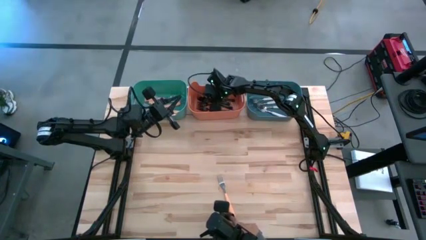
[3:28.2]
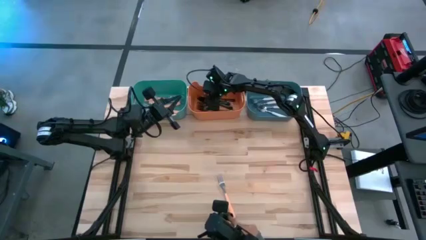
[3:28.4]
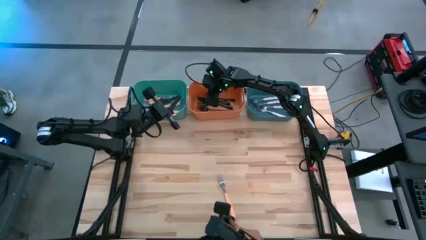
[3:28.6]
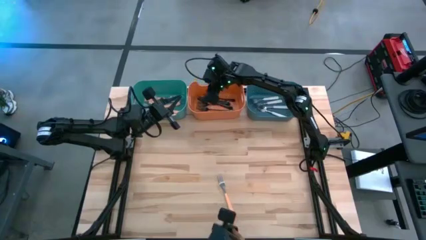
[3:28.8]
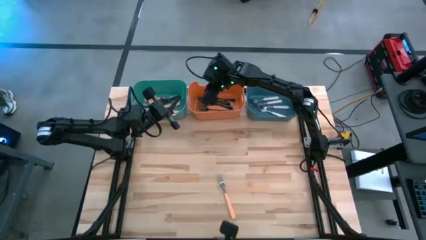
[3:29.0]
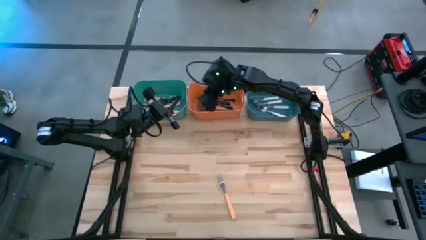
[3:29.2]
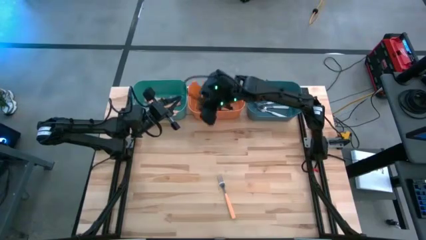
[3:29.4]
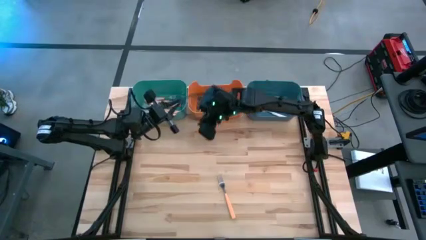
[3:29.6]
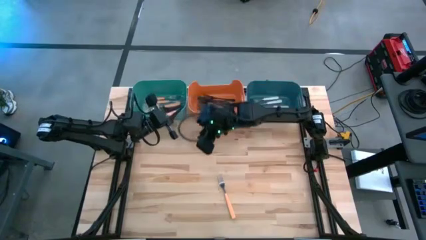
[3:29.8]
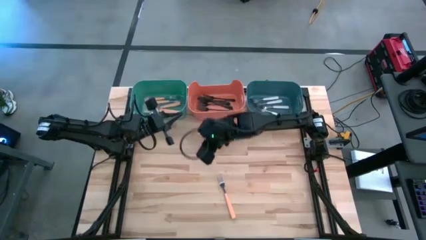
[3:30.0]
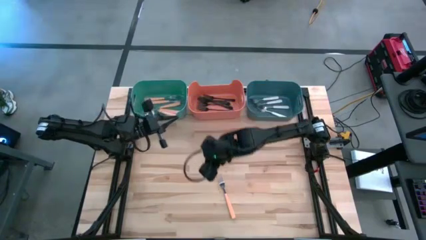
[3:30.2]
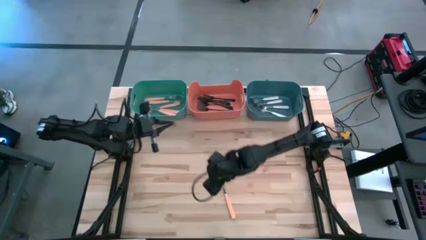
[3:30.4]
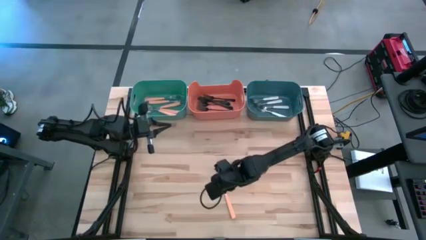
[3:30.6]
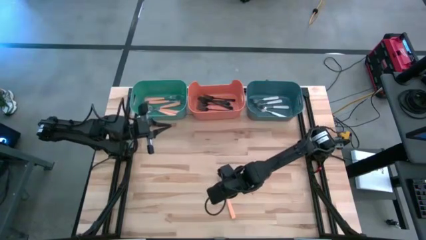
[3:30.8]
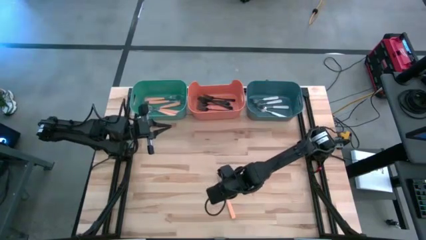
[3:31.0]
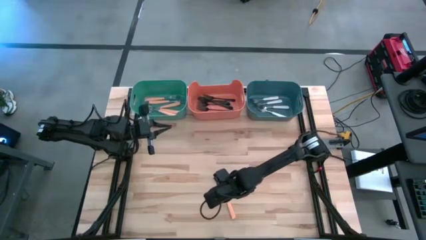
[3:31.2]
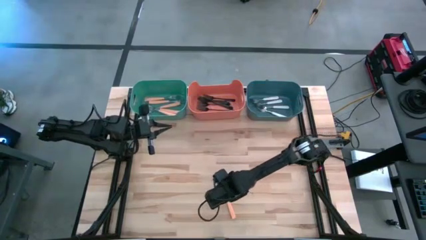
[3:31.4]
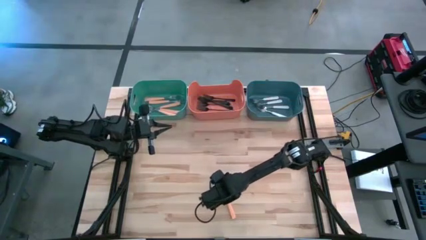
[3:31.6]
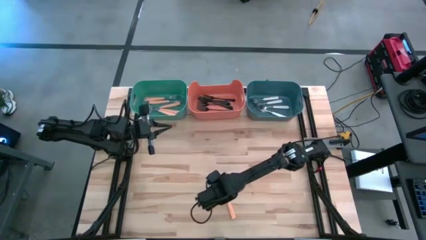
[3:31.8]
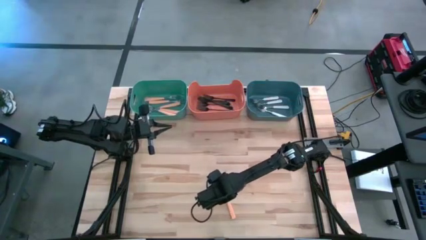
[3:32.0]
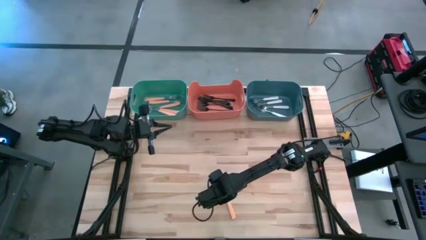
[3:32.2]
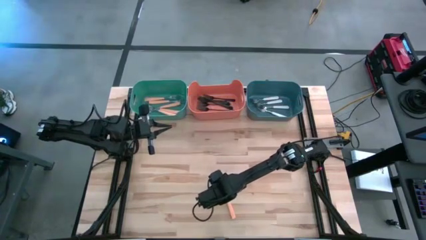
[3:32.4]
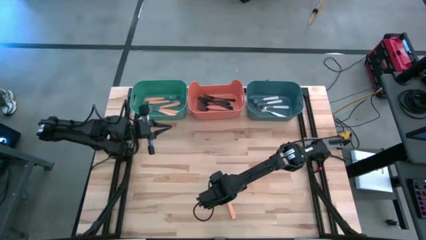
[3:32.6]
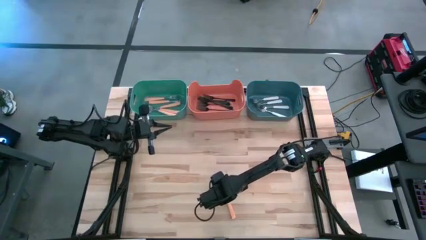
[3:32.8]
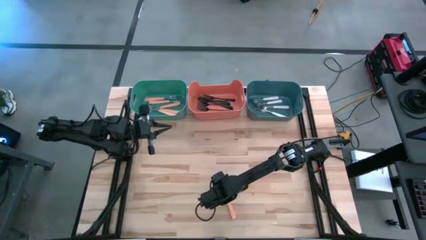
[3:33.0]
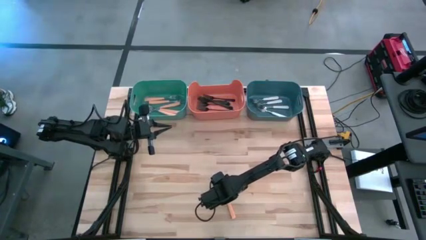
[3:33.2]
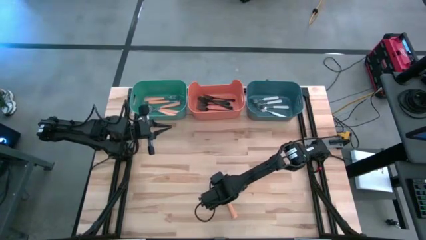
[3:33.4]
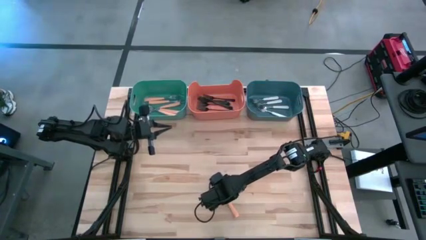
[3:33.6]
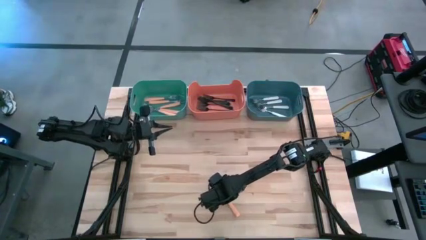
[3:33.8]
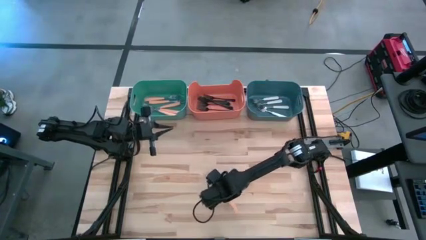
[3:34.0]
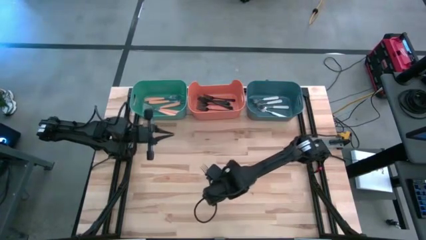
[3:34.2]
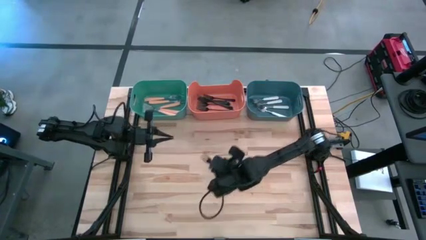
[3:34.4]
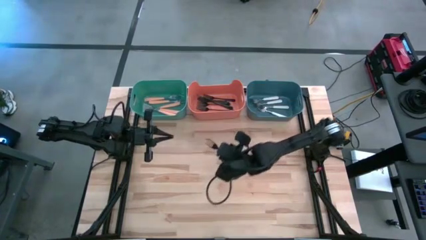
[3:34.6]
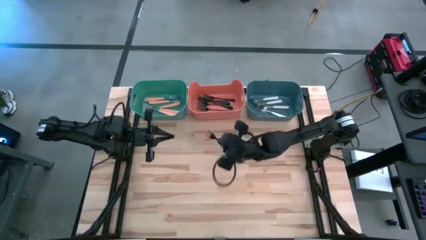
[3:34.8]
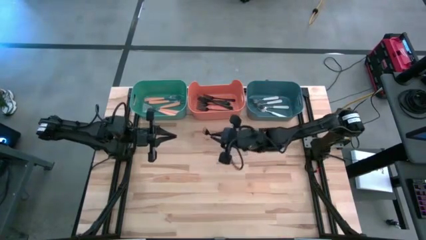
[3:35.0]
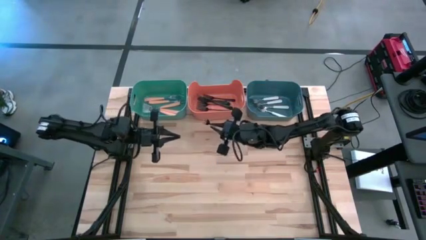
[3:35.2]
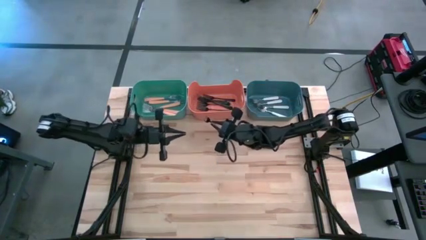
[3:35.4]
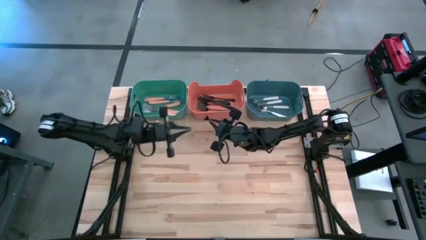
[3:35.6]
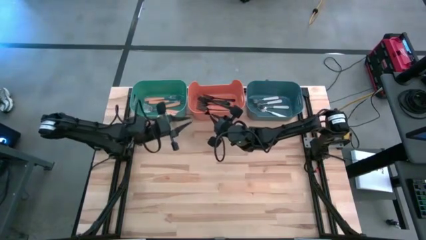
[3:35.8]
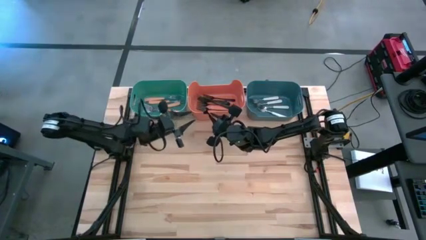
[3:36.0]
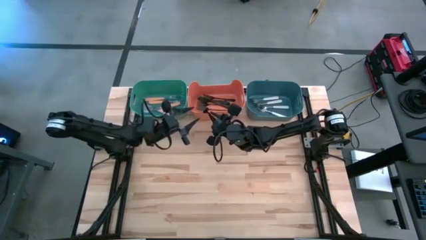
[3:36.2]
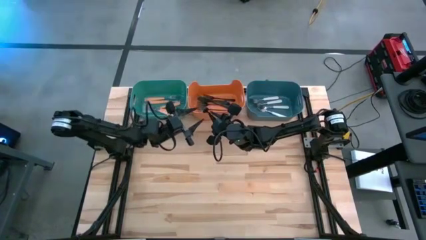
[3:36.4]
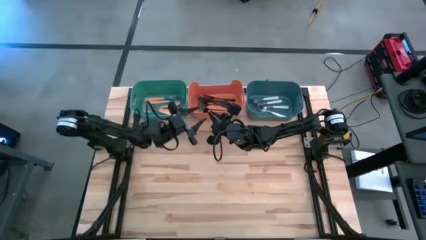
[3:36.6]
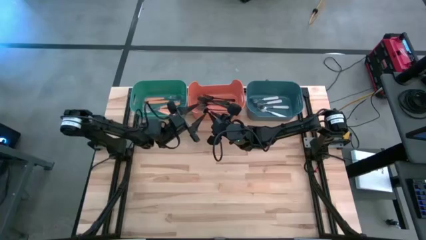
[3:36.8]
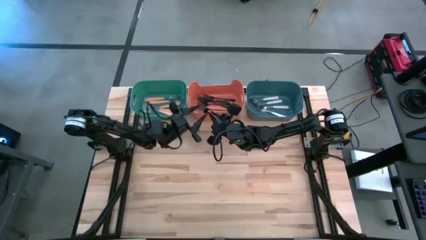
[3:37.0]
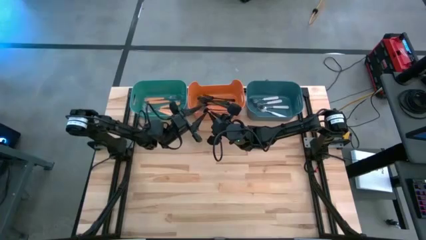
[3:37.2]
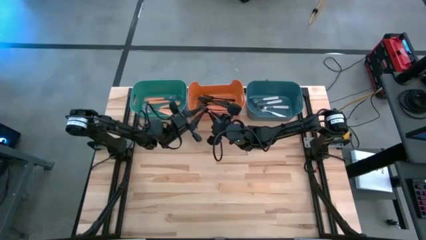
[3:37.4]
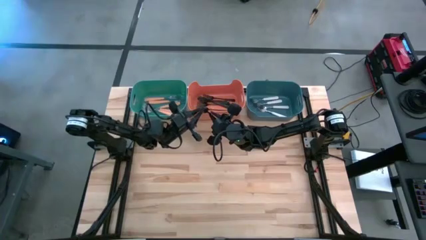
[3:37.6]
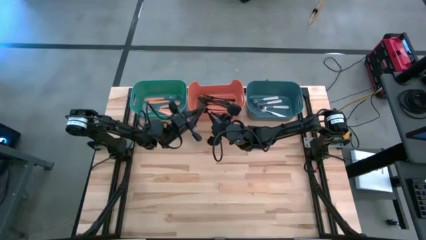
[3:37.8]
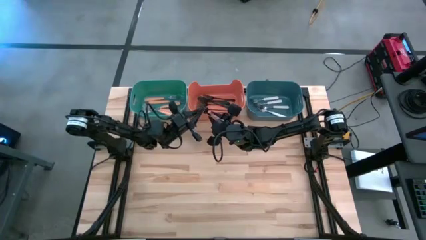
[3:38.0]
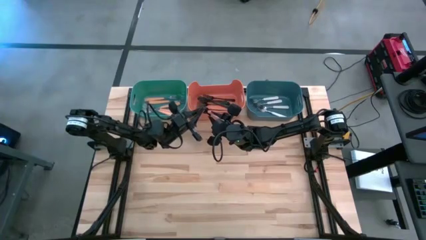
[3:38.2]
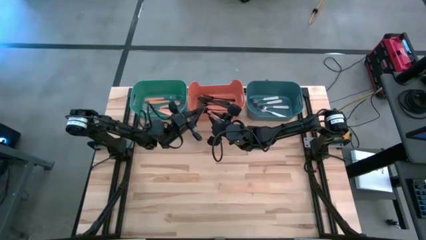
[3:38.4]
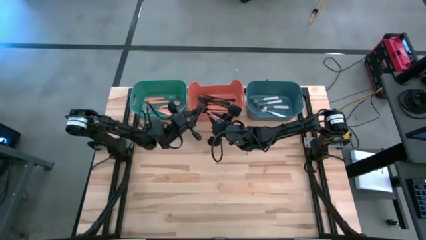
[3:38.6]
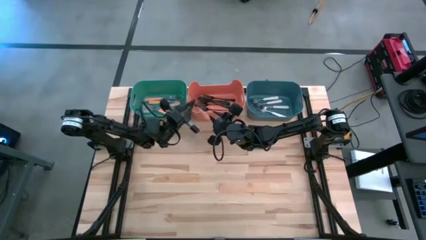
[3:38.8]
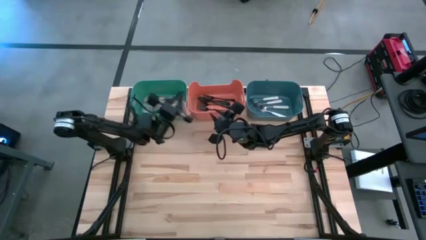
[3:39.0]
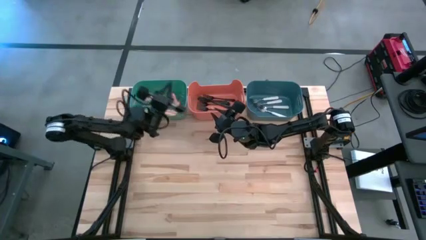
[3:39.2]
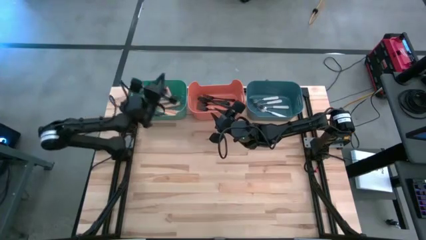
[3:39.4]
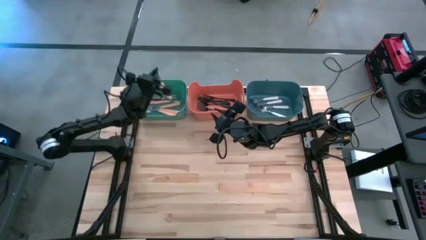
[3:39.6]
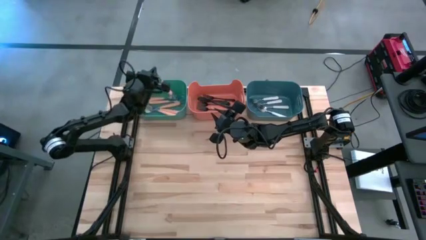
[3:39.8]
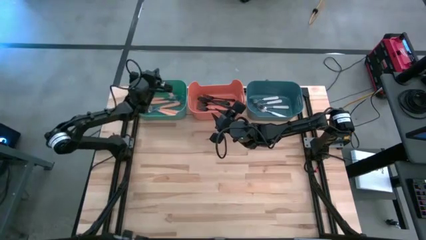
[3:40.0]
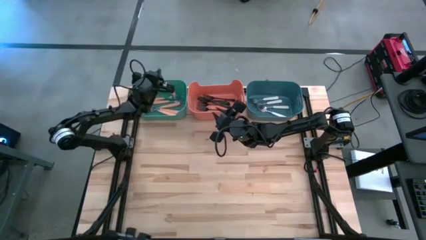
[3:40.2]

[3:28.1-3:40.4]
Task: Sort silverware by color (type)
Put the orange fork into the green bin

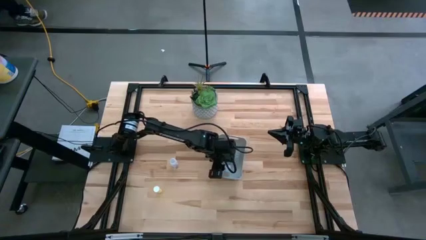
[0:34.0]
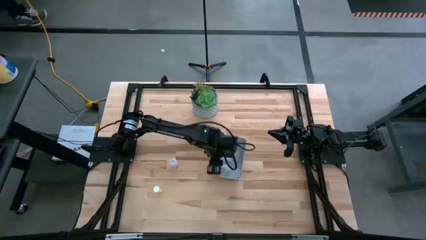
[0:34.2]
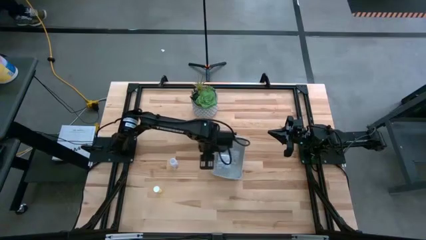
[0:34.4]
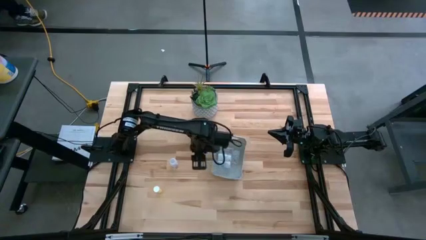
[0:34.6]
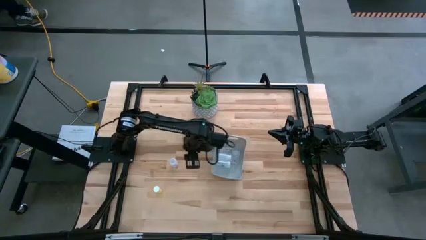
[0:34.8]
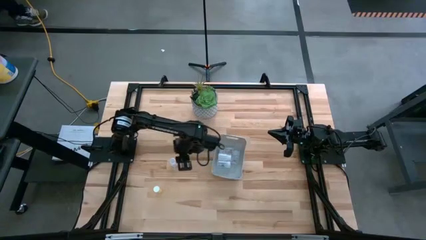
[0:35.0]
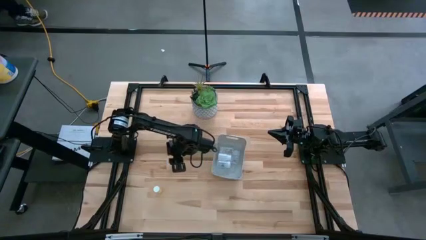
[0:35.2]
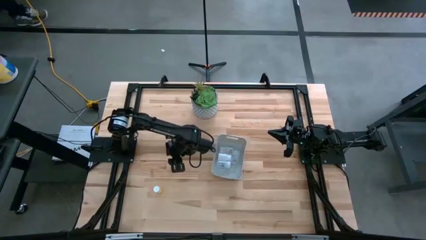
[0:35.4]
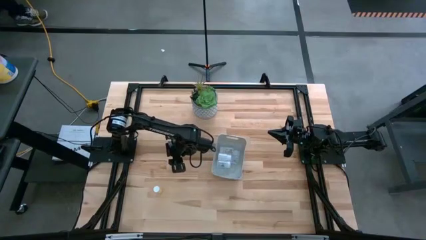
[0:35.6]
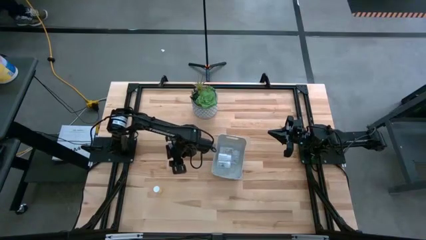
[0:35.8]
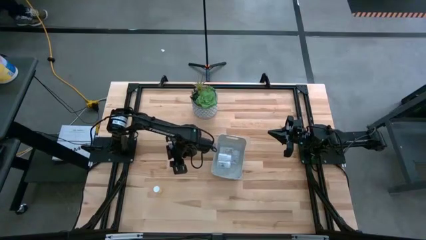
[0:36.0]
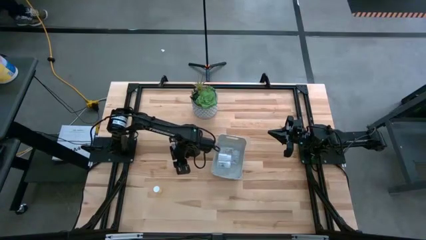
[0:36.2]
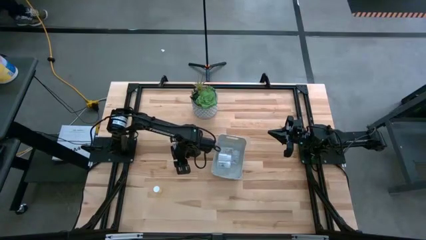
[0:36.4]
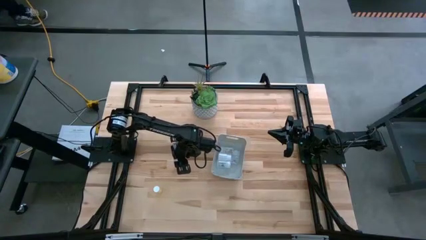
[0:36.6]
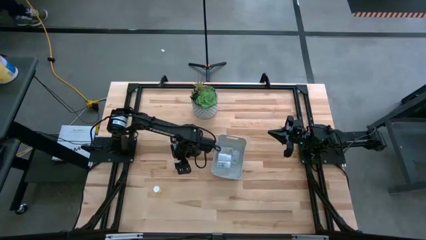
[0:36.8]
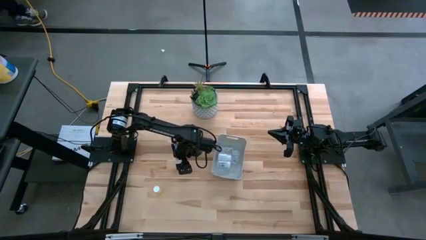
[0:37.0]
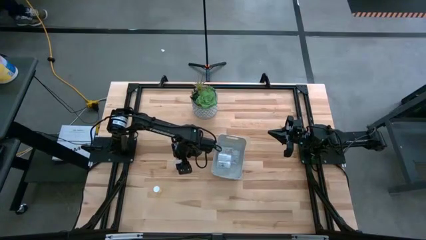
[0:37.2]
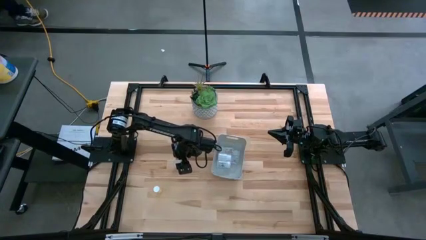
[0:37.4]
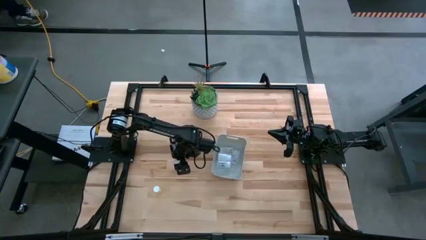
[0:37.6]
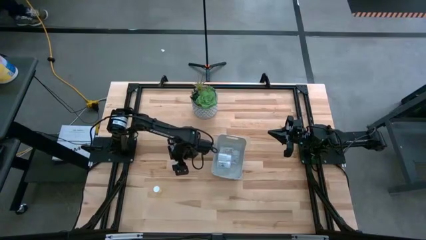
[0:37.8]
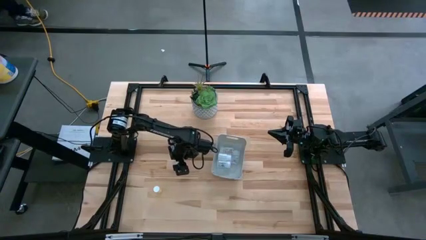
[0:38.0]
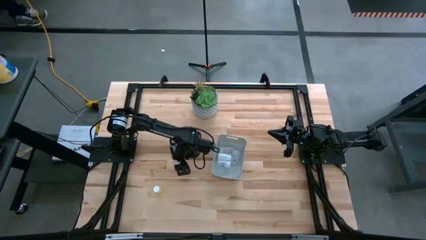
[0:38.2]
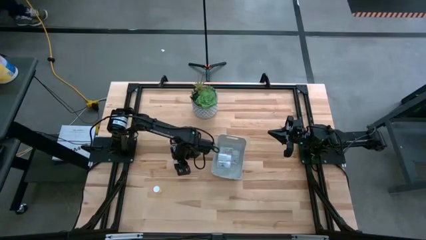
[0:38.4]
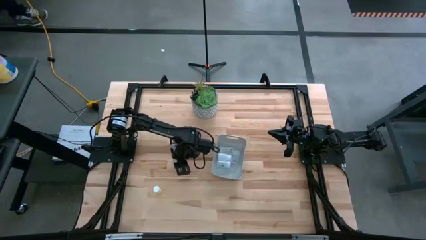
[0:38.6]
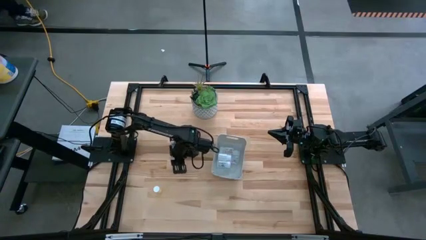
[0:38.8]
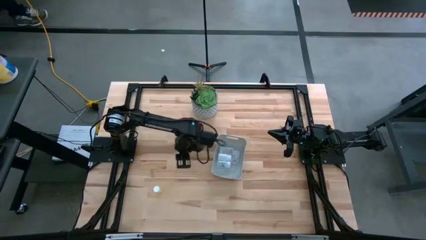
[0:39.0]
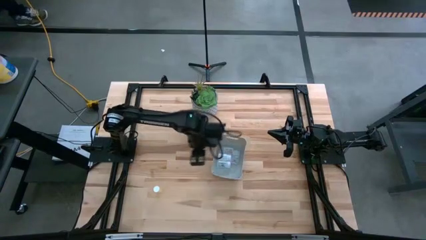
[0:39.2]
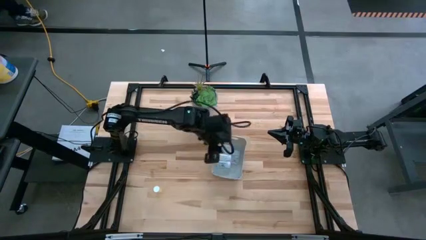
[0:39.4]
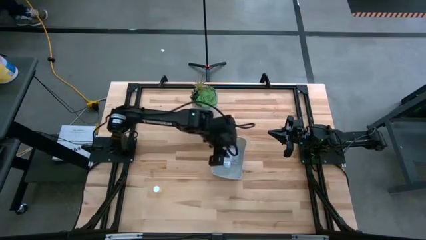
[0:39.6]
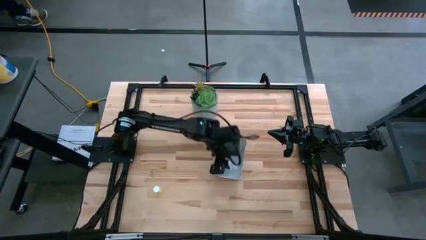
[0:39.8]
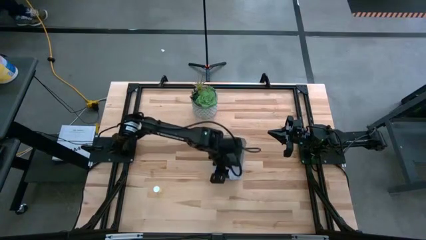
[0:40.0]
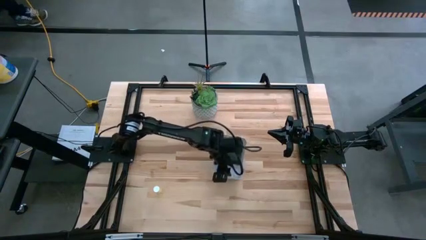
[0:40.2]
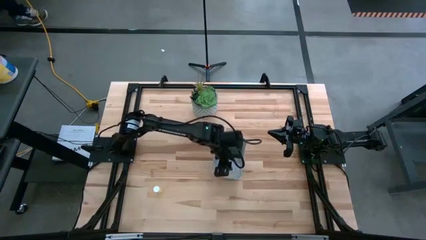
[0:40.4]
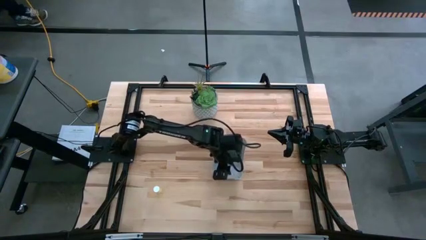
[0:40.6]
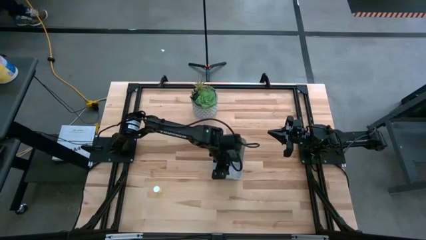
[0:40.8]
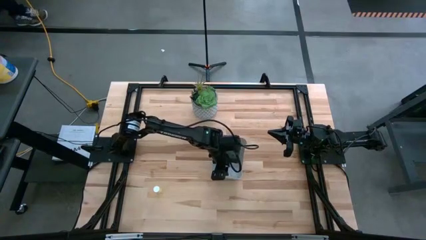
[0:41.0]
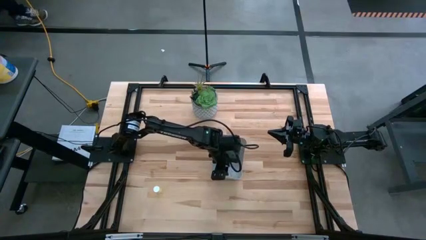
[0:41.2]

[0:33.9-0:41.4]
Task: Pick and place pill bottles into a basket
Put the transparent medicine bottle into the white bin
